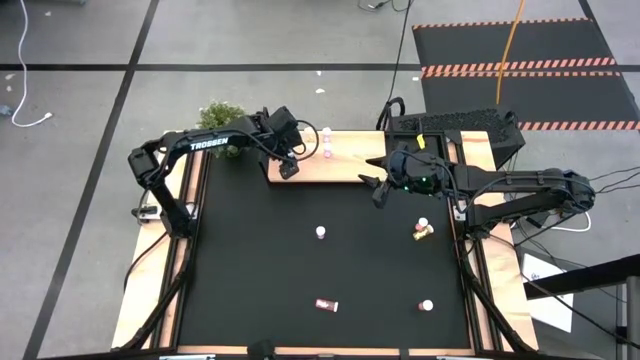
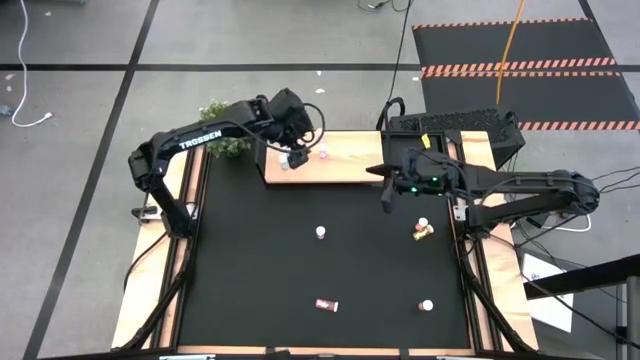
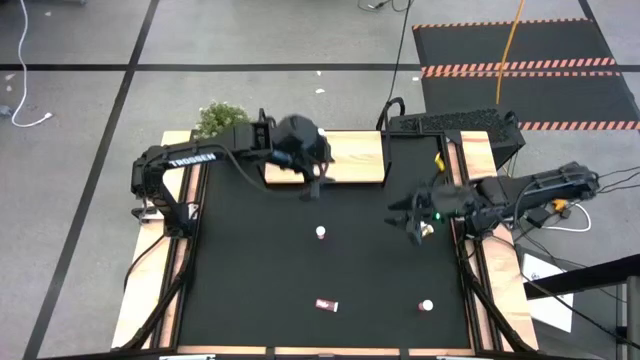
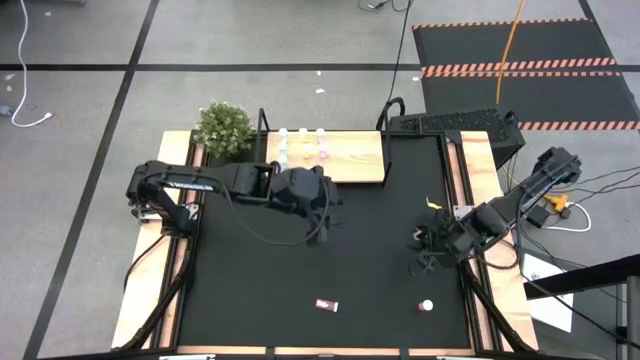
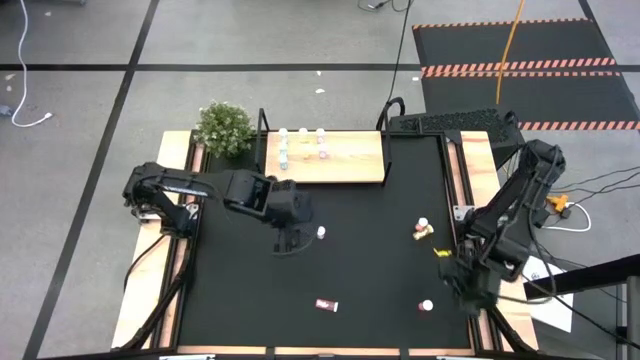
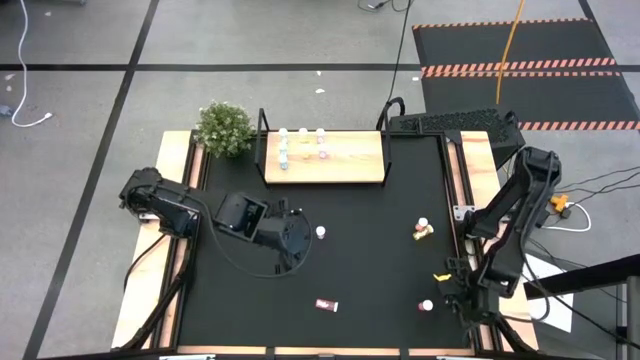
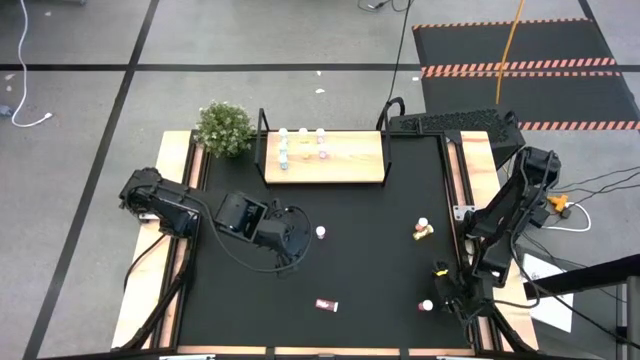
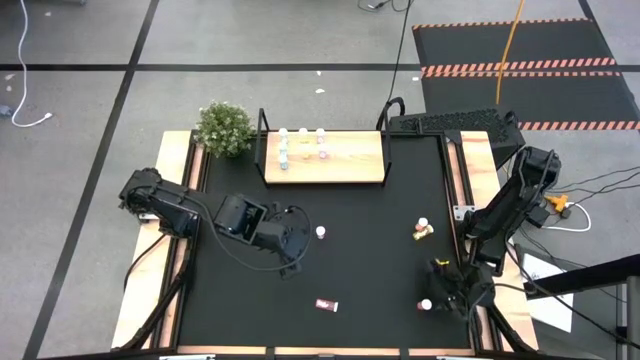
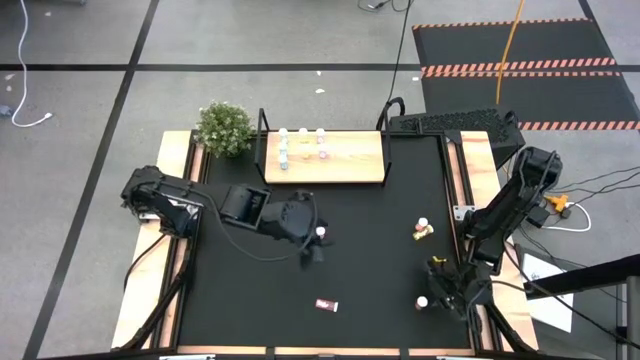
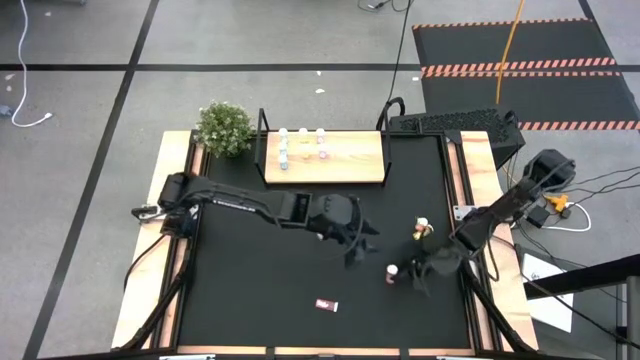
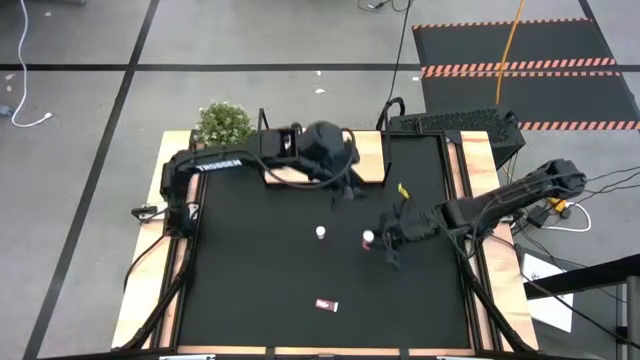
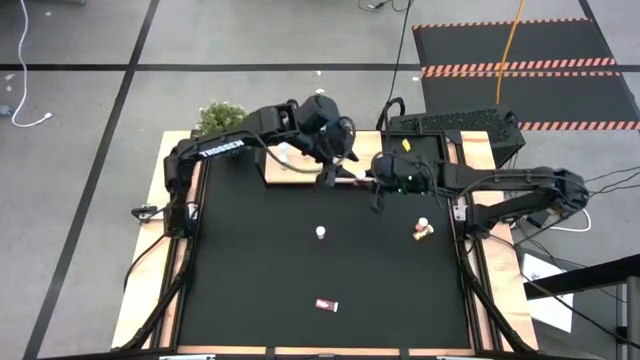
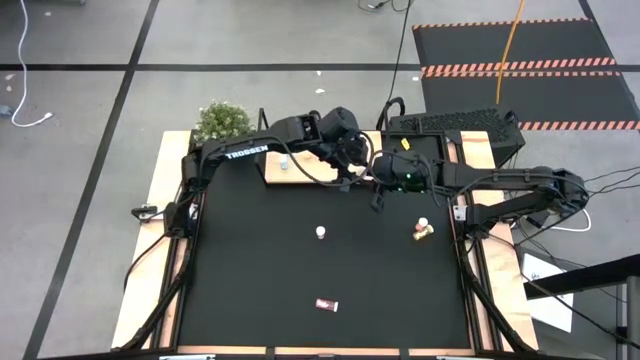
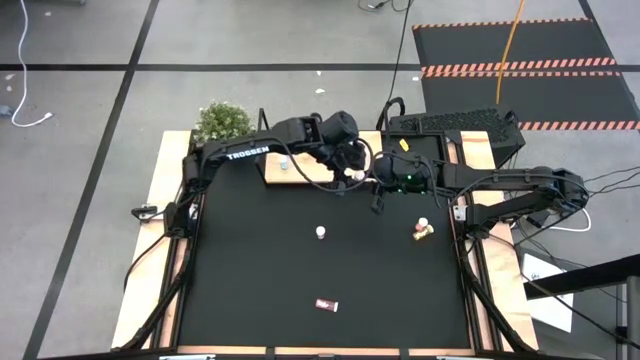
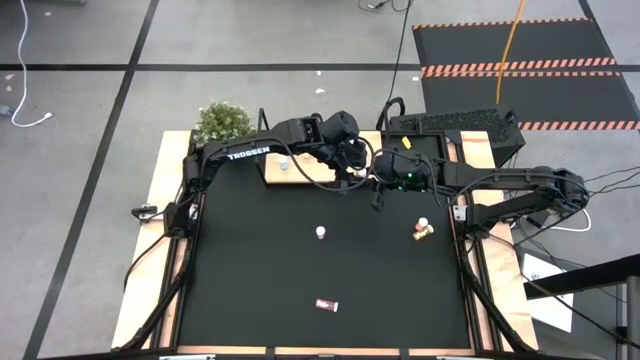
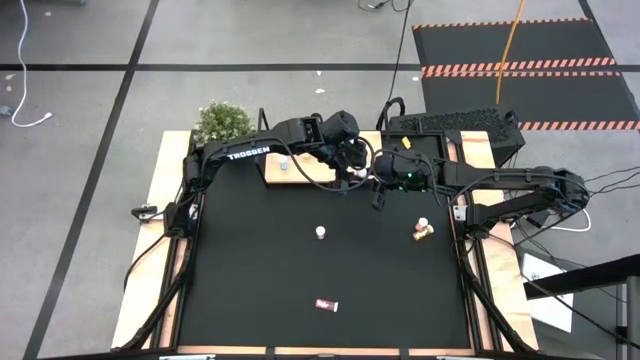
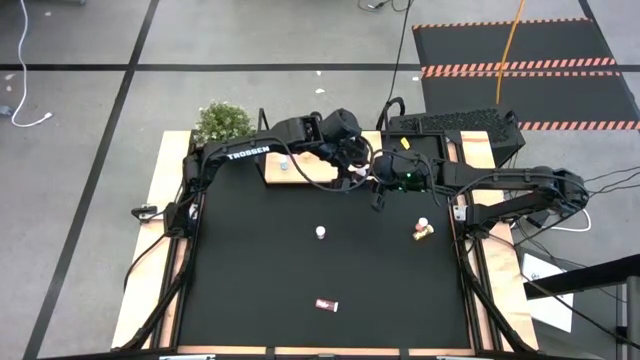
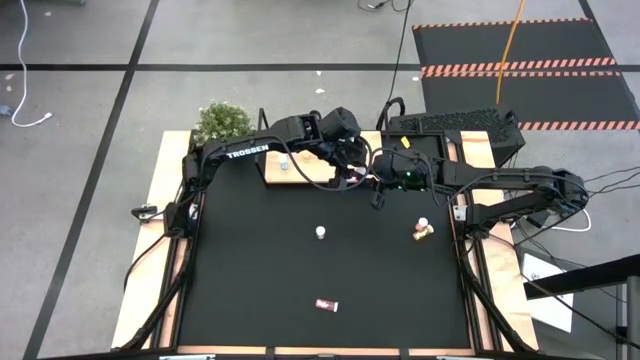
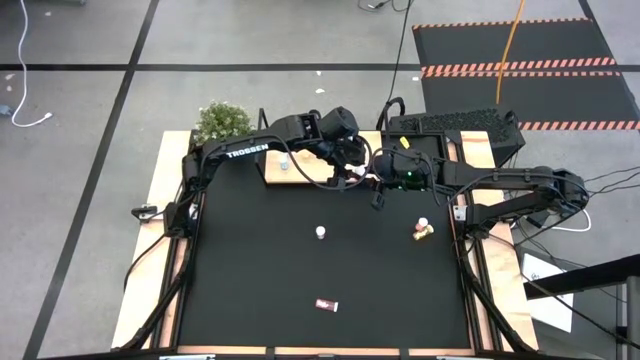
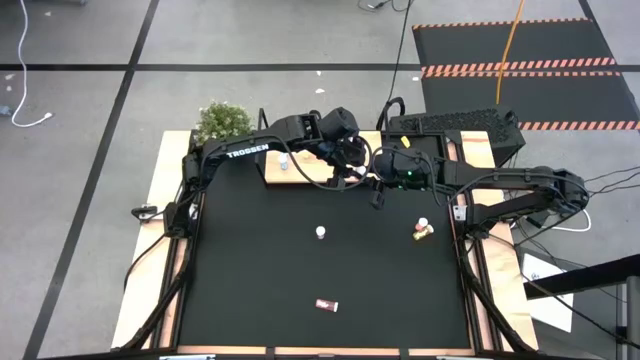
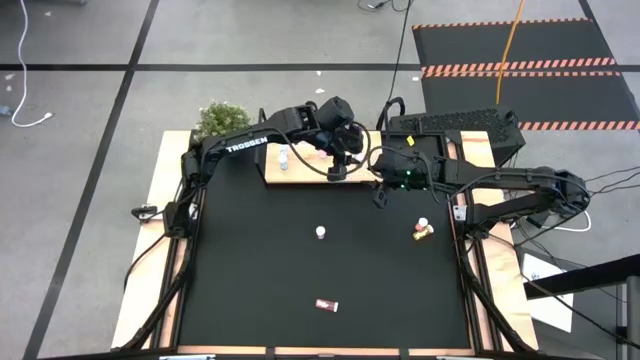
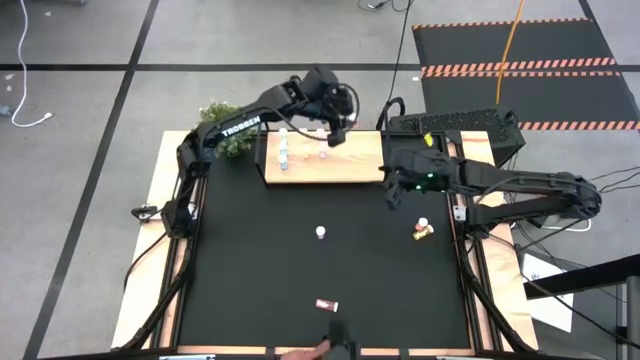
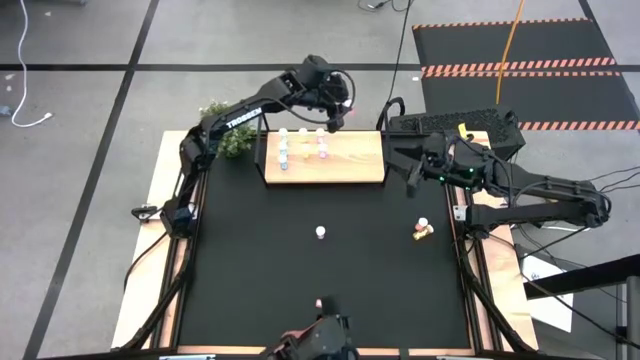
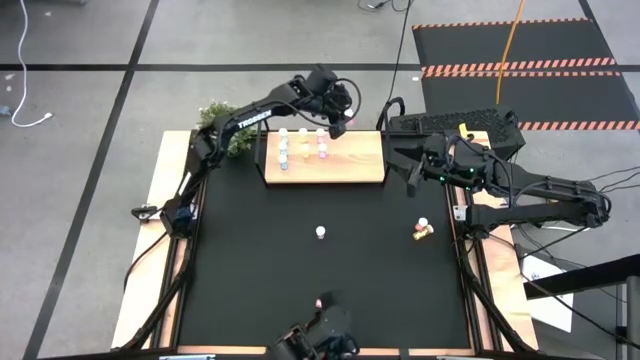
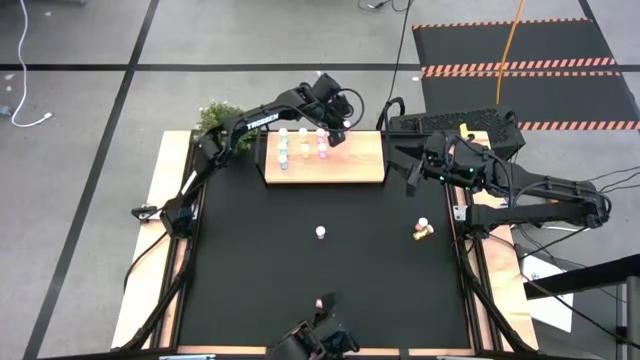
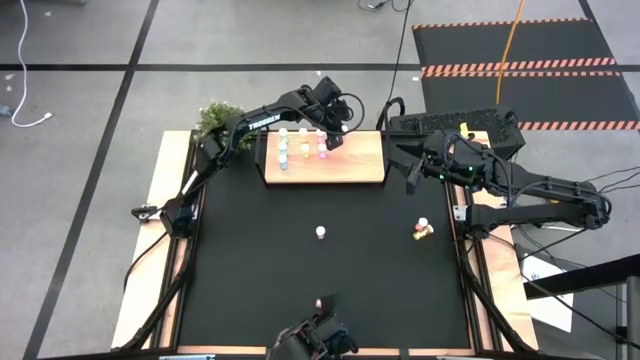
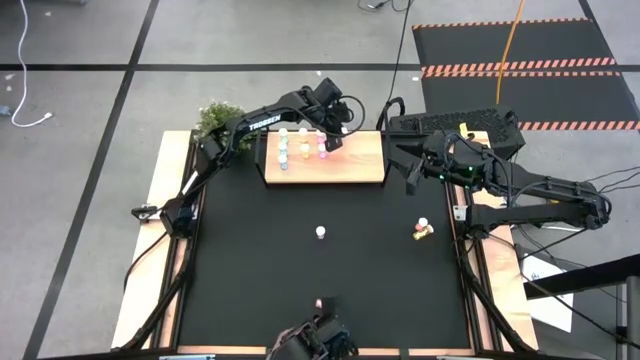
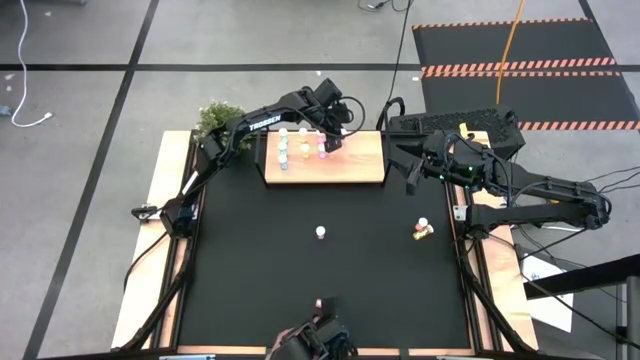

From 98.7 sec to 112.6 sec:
Task: Pick and place medicine bottles onto shelf by color
Put the bottom right orange pill bottle on the shelf

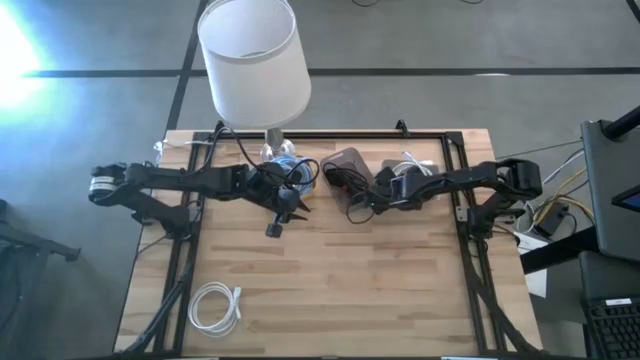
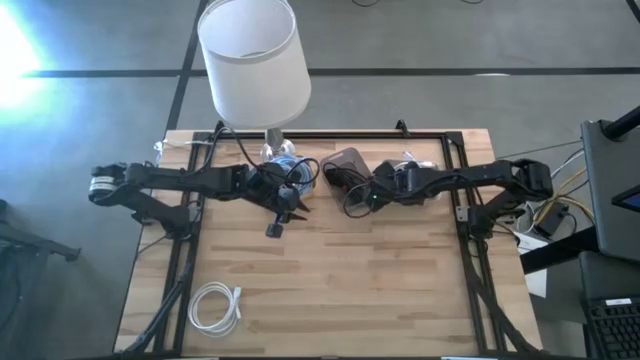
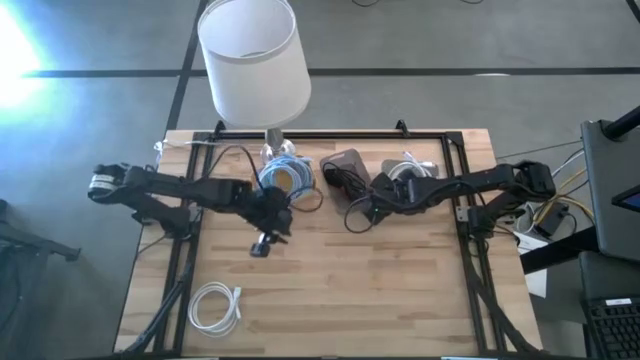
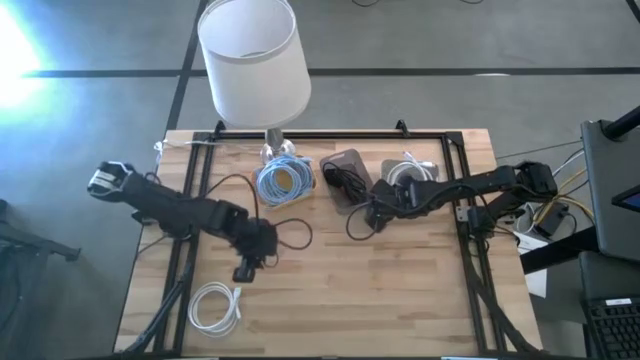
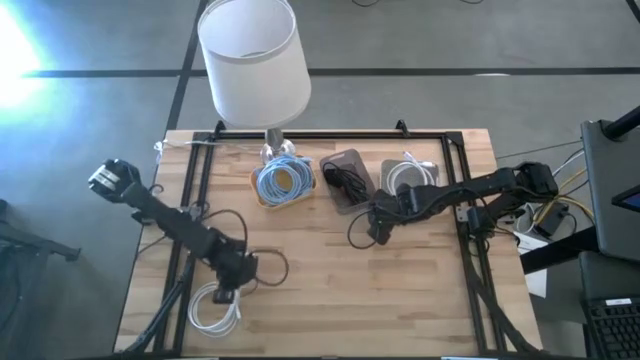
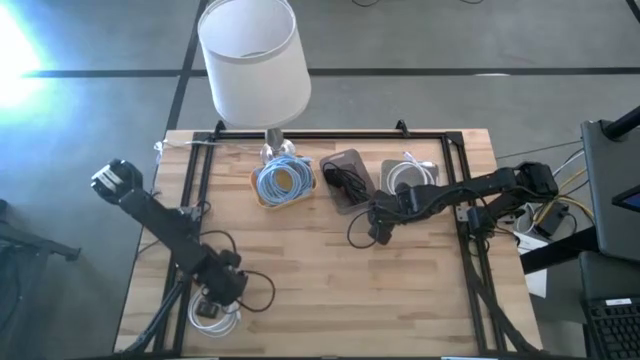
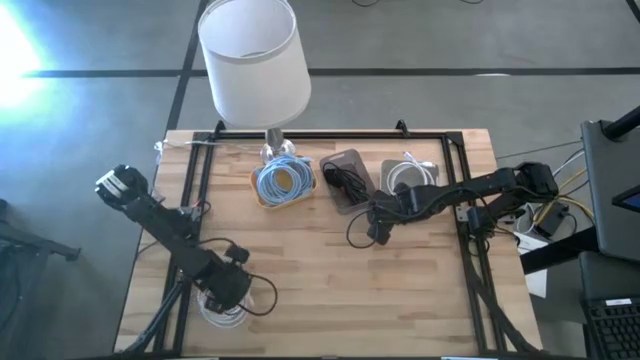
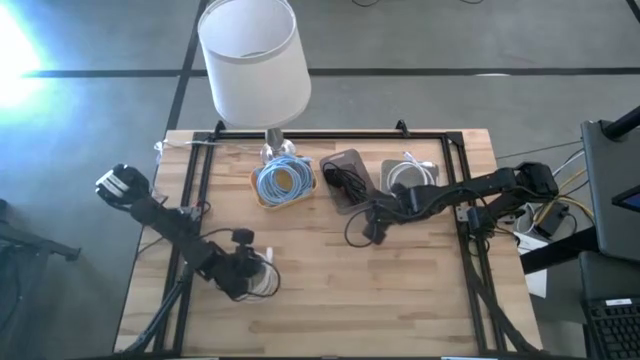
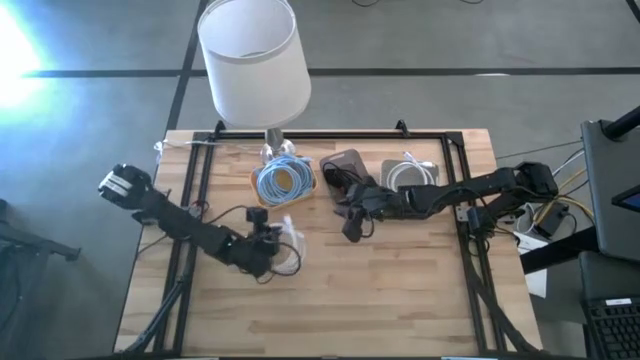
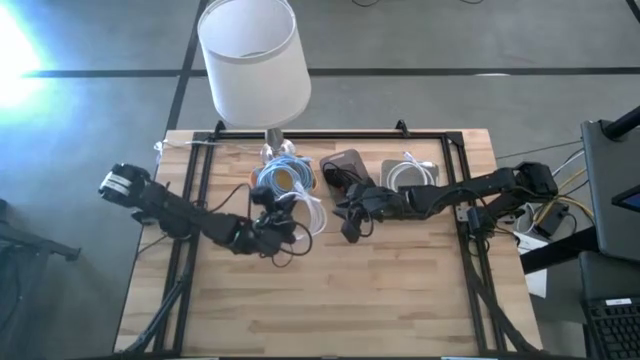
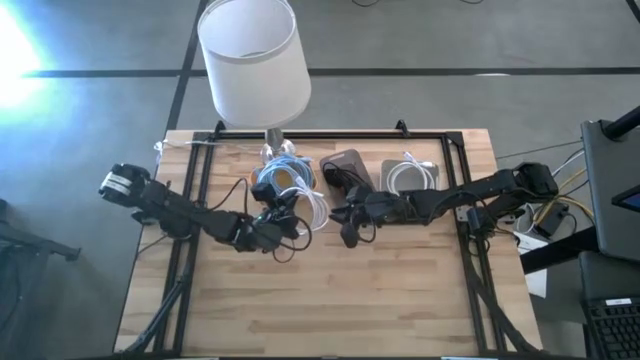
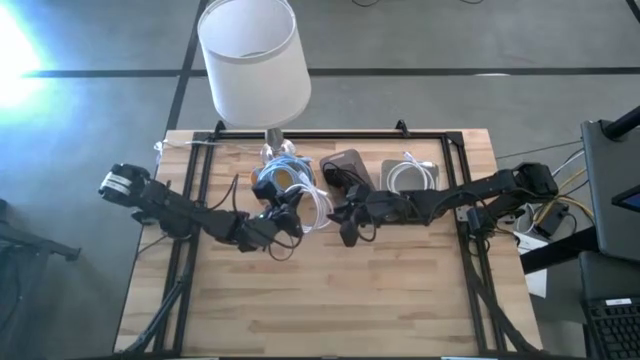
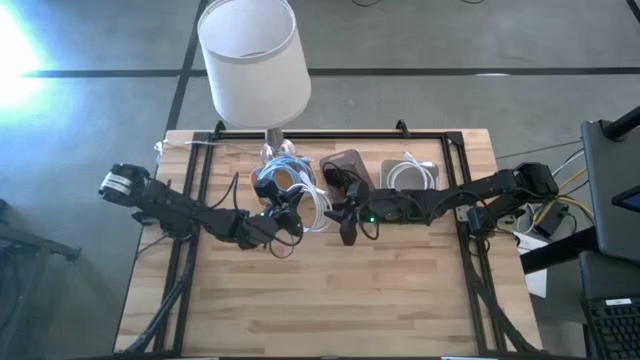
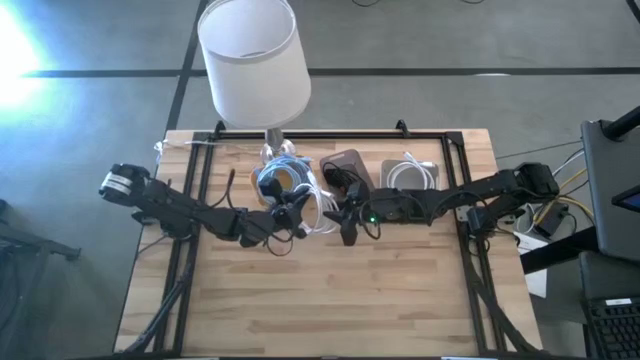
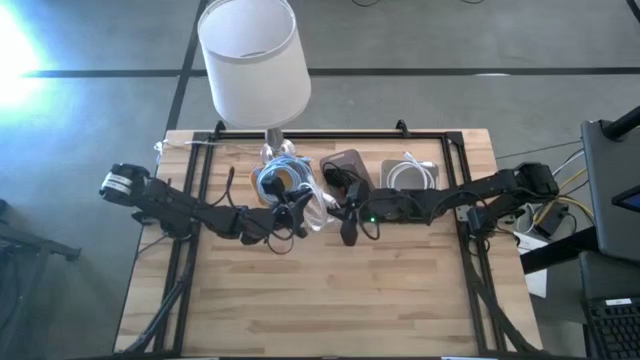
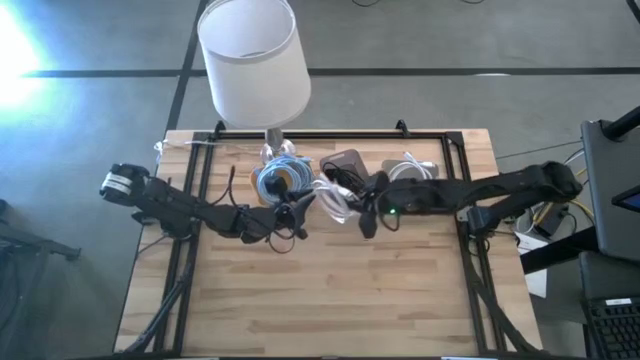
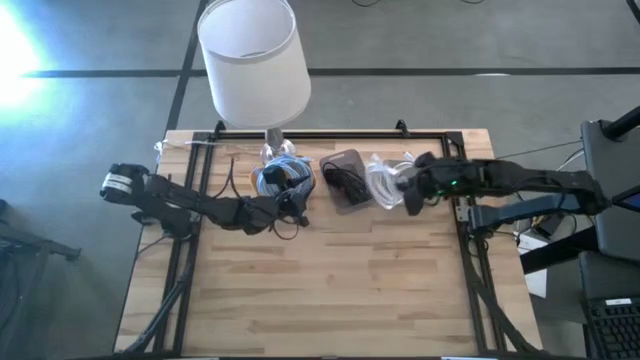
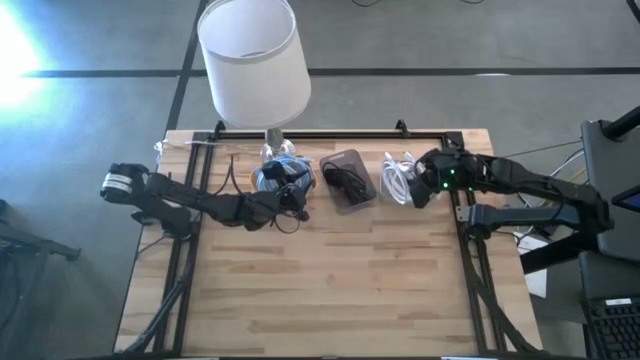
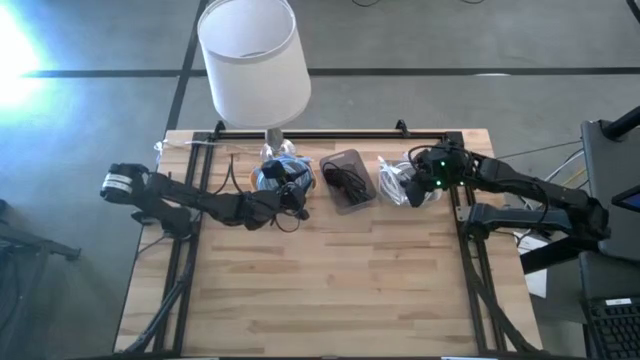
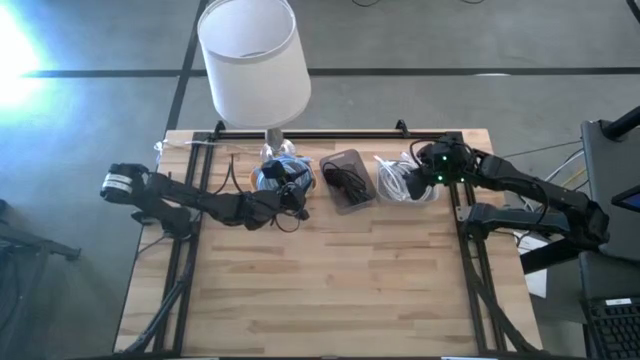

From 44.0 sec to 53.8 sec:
Task: Pick & Place USB Port
Put the white charger cable into the gray bin
